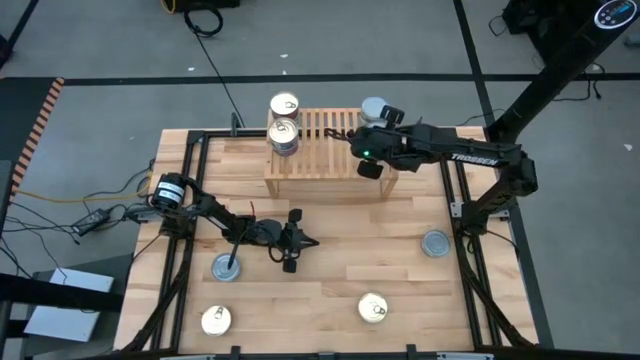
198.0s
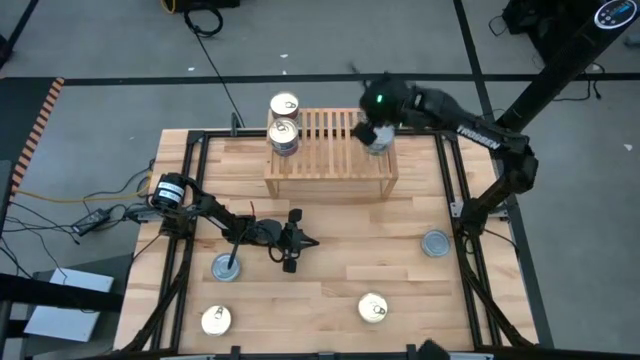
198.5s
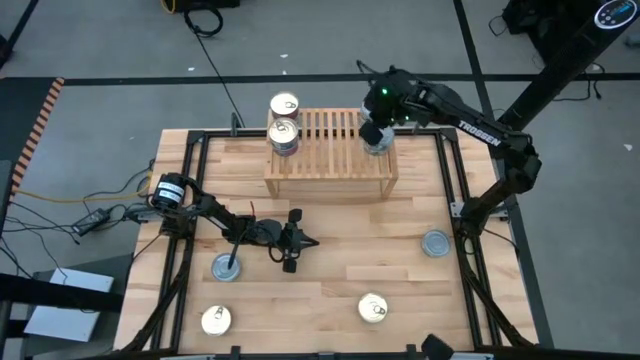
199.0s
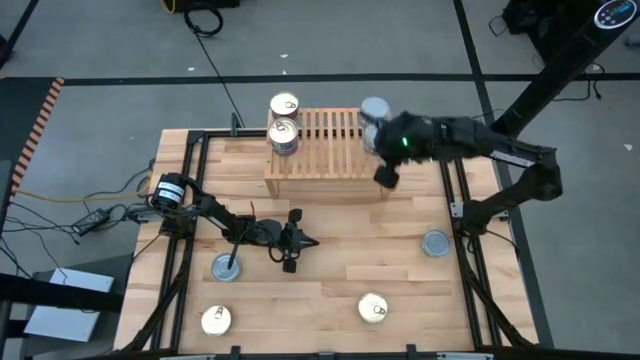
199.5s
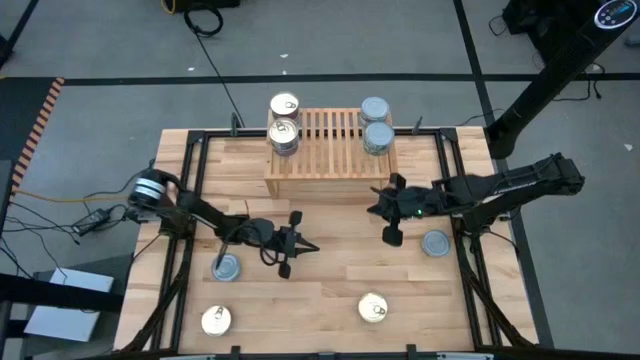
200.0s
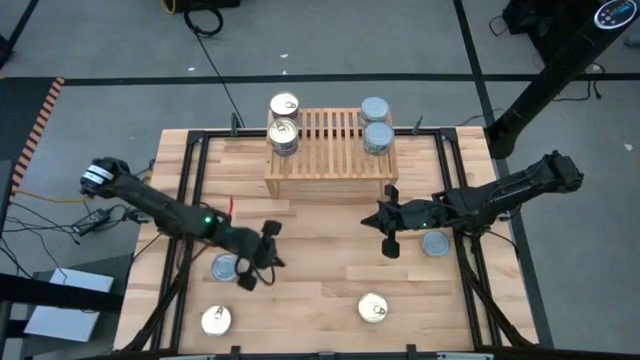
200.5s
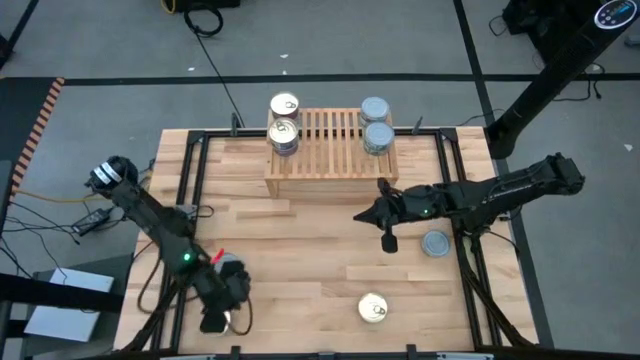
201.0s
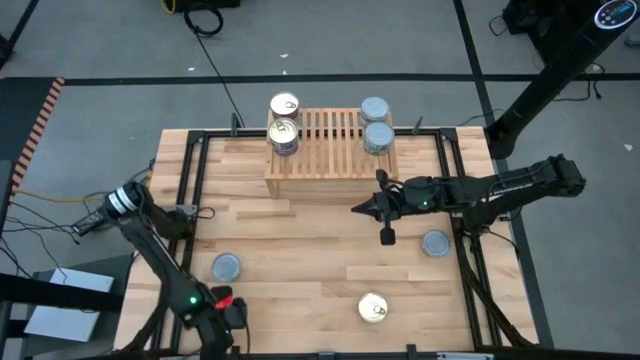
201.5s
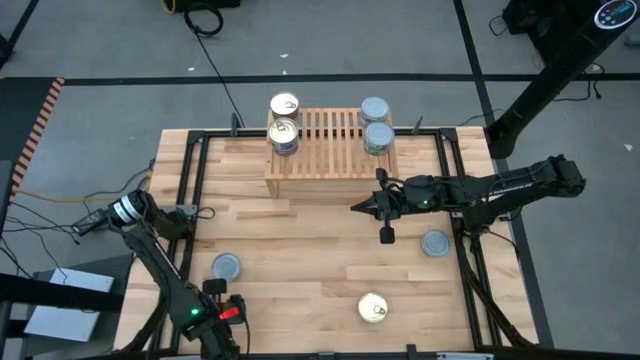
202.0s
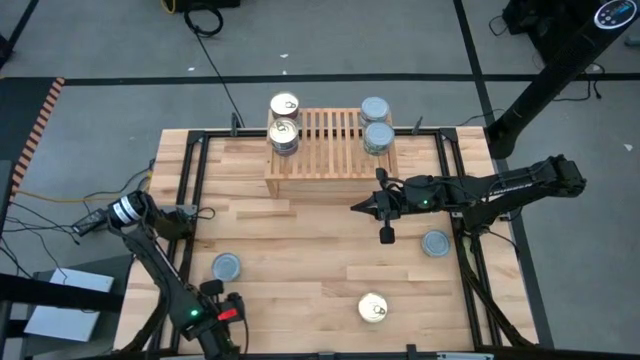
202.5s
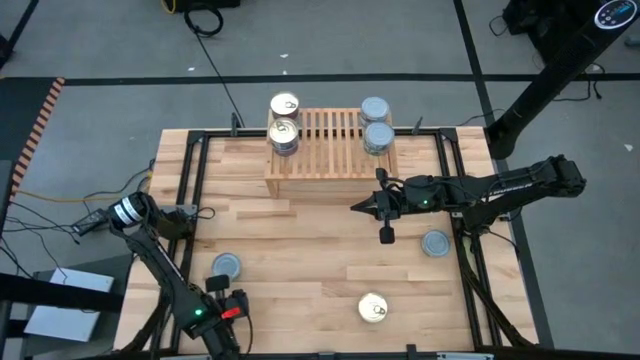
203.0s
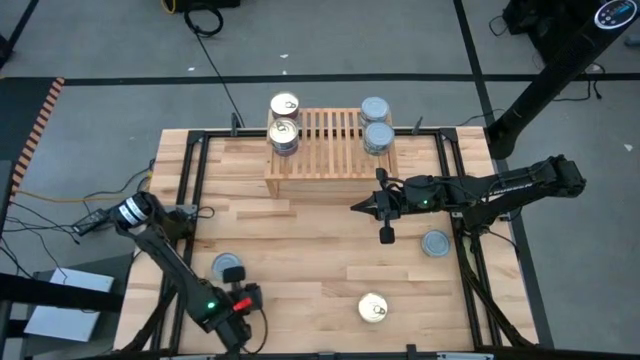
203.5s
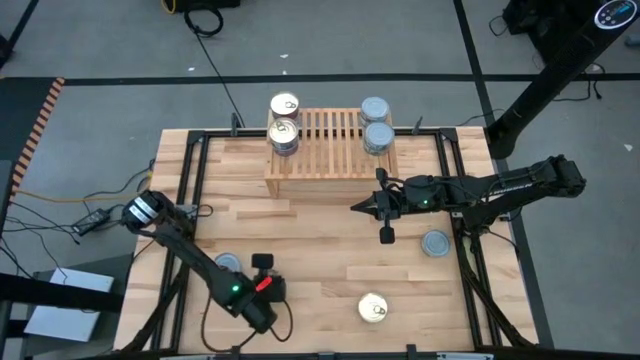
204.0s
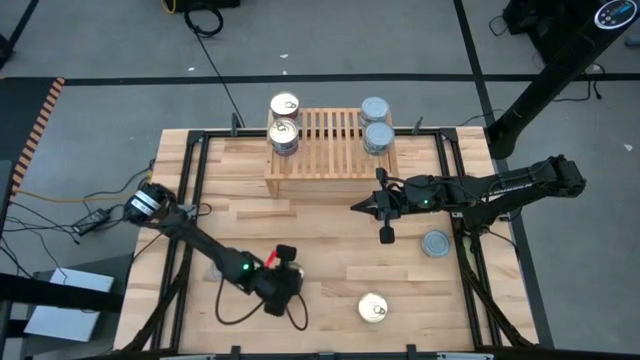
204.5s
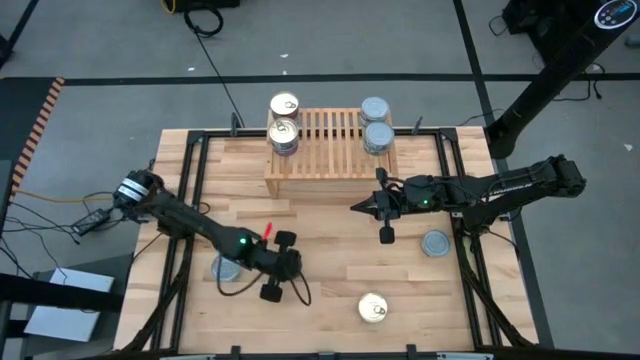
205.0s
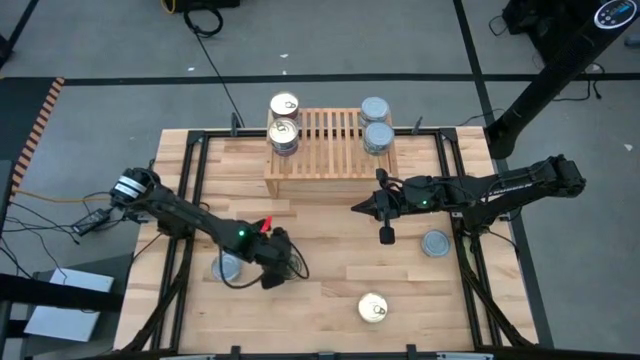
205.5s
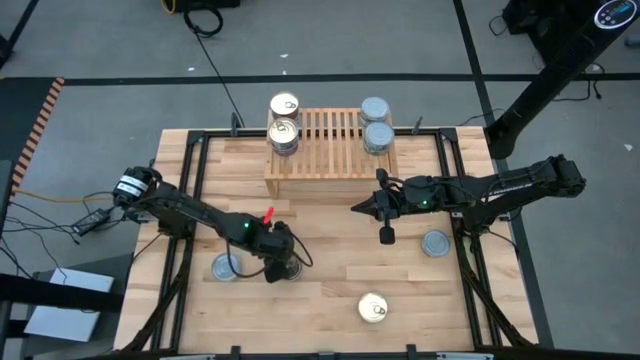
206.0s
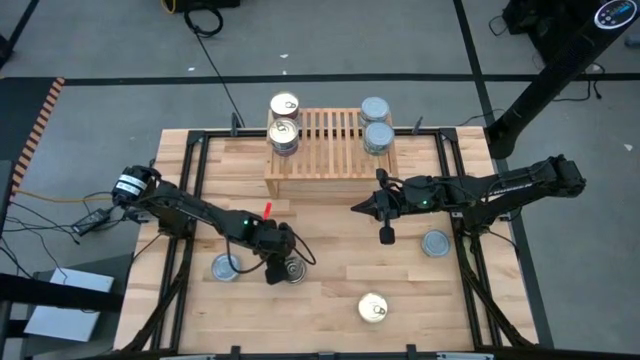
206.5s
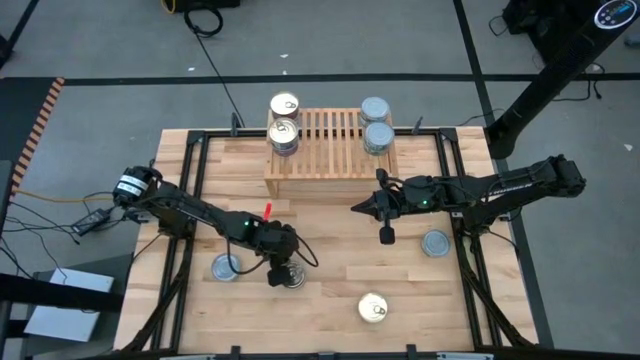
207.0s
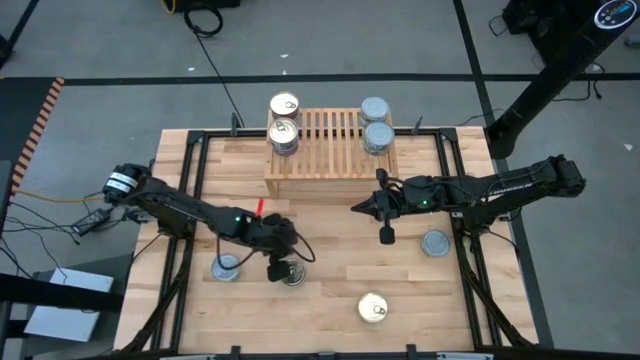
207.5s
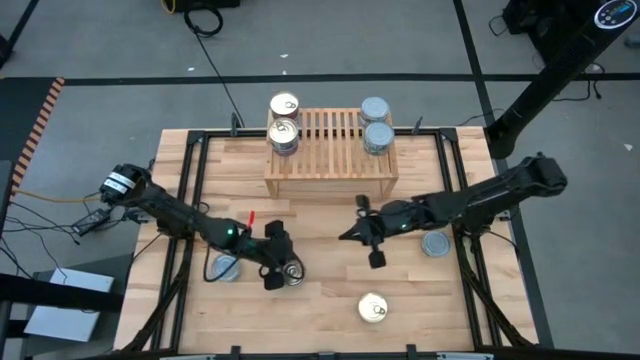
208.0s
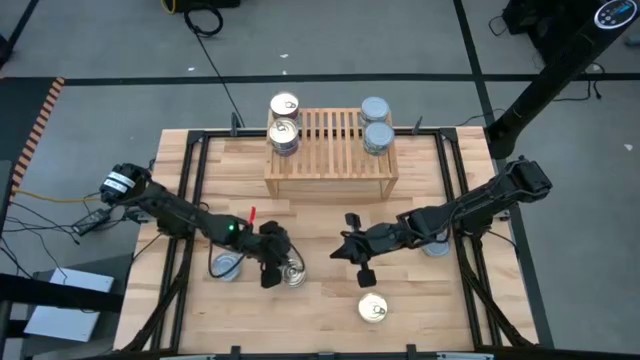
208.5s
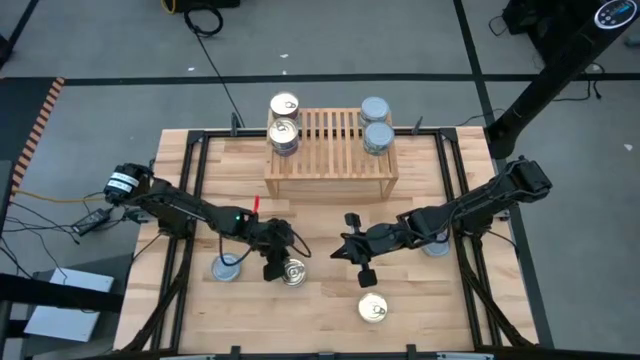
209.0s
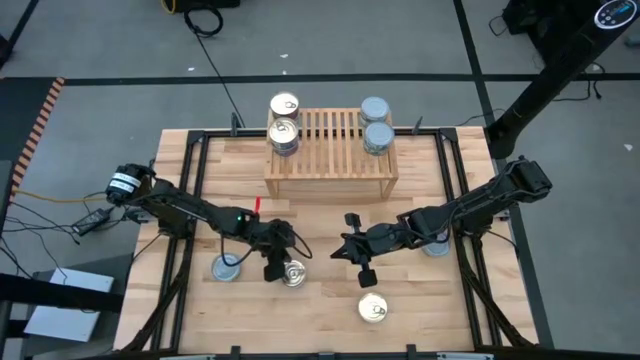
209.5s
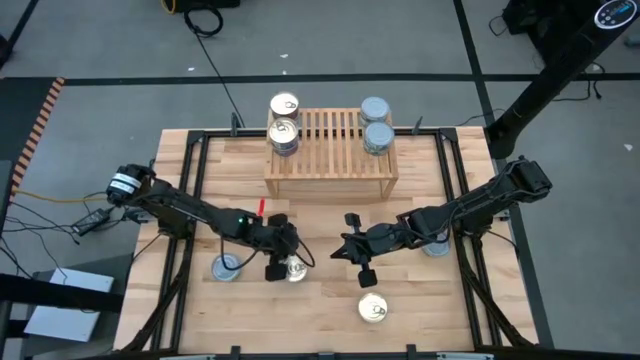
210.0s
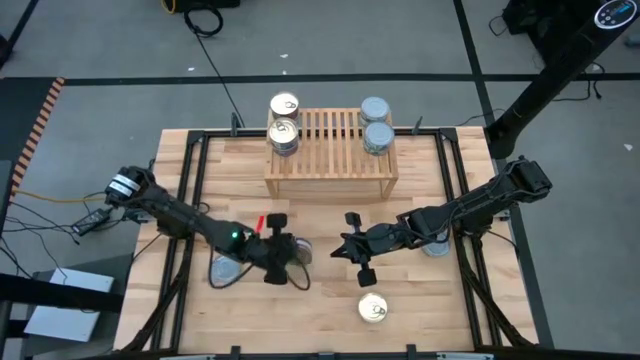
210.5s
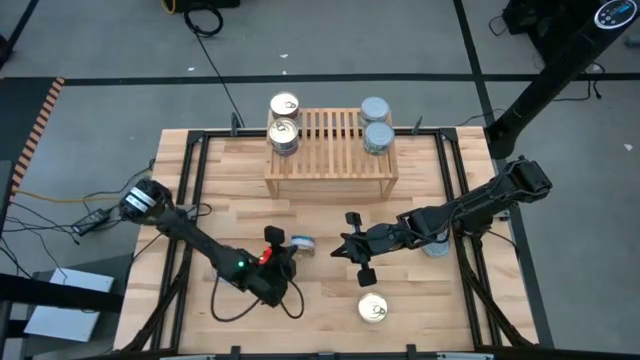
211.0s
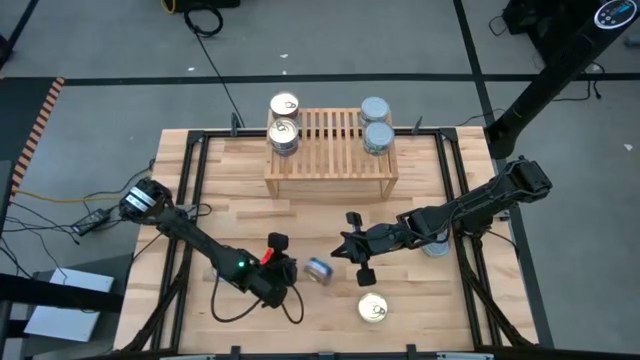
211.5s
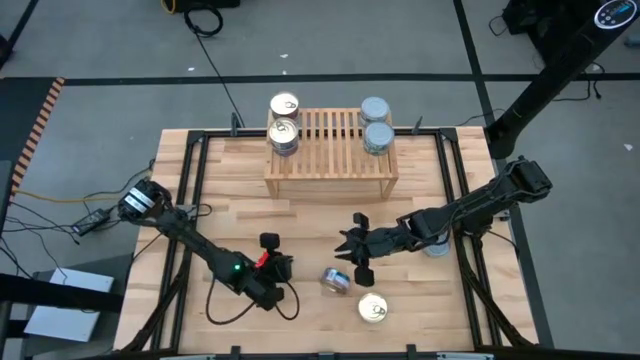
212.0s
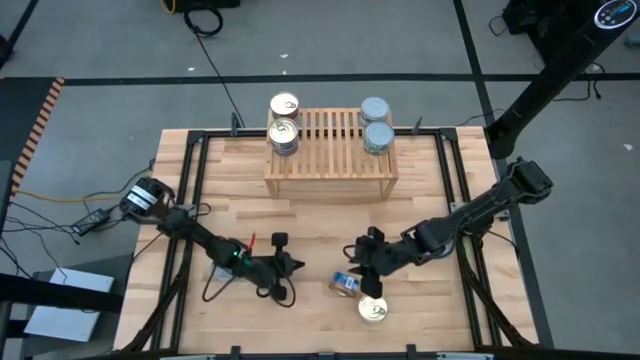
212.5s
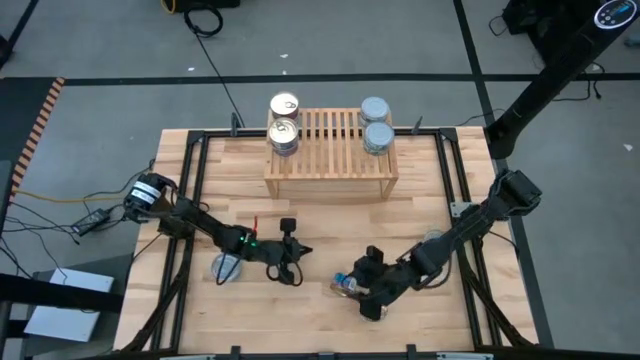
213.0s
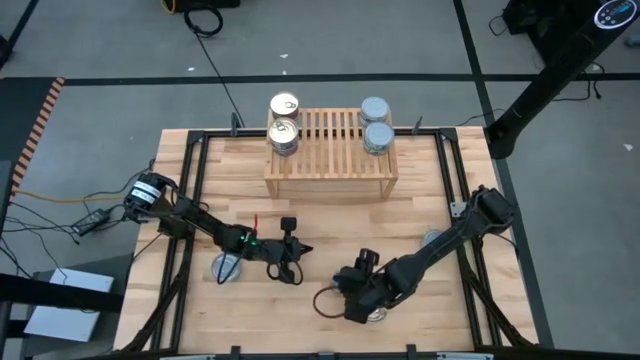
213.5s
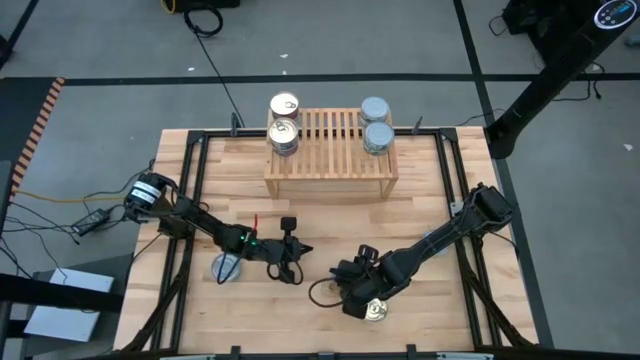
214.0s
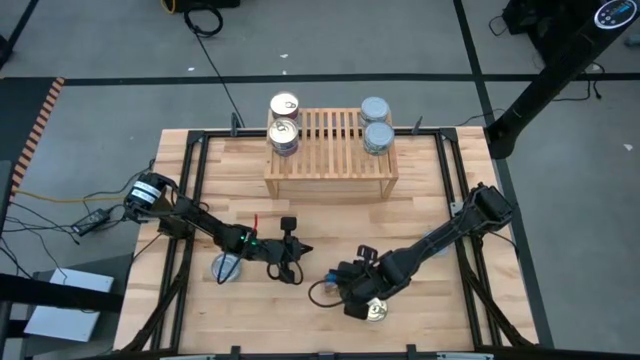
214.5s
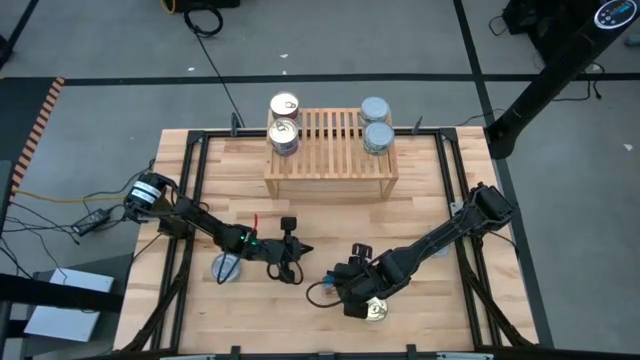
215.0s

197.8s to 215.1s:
Task: Stack canned seafood by type on shelf
Put the blue pink tuna can on the shelf
